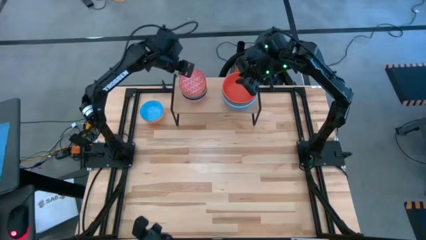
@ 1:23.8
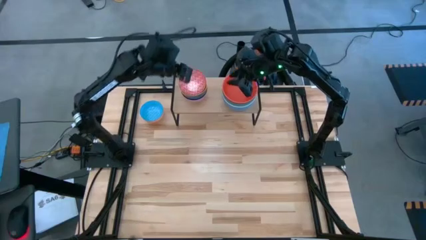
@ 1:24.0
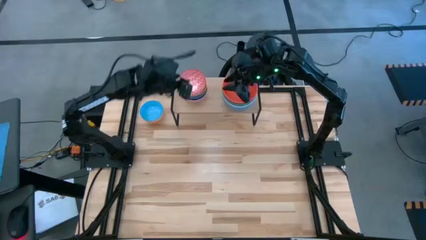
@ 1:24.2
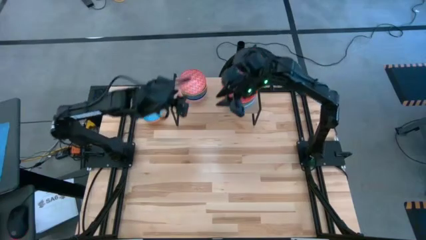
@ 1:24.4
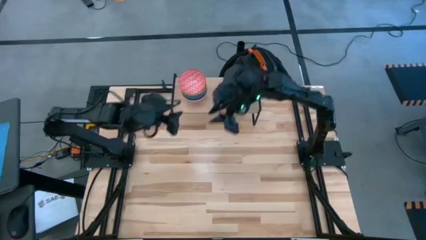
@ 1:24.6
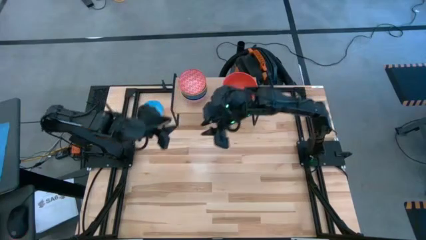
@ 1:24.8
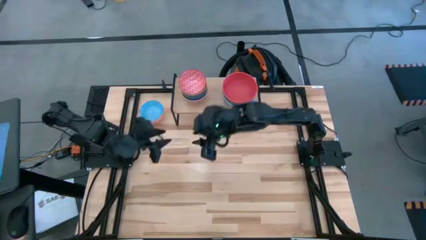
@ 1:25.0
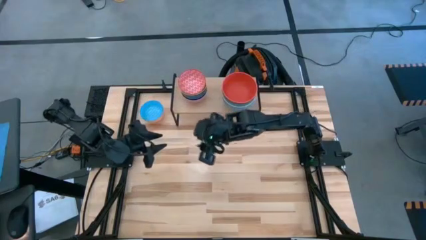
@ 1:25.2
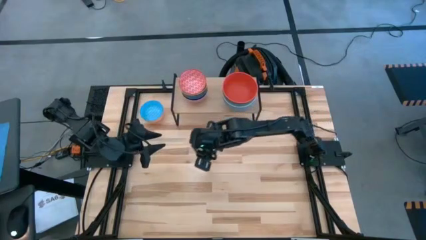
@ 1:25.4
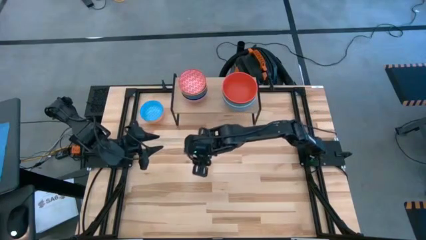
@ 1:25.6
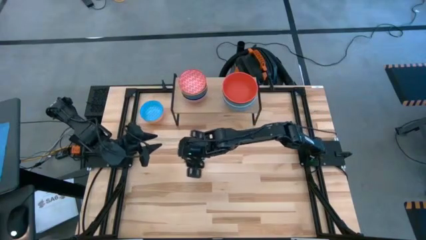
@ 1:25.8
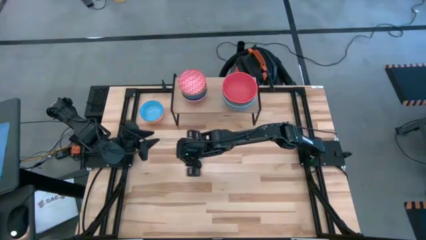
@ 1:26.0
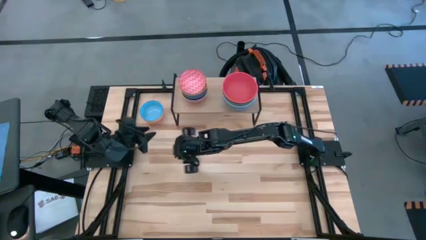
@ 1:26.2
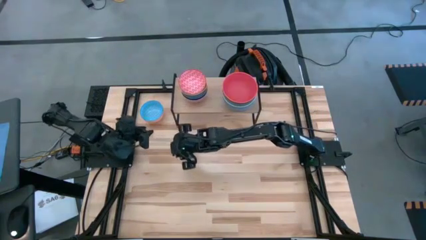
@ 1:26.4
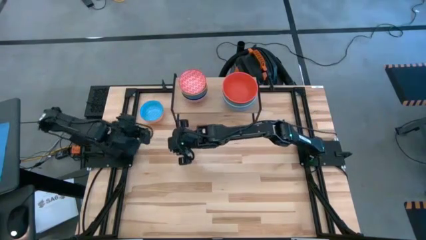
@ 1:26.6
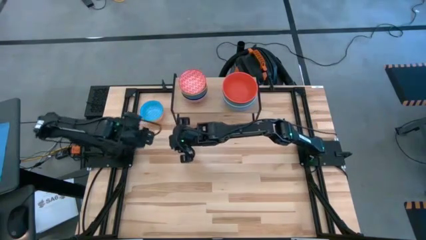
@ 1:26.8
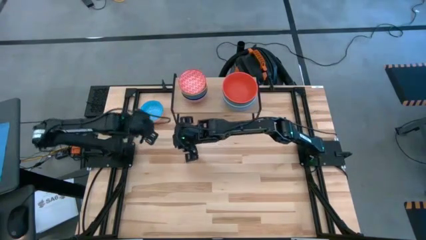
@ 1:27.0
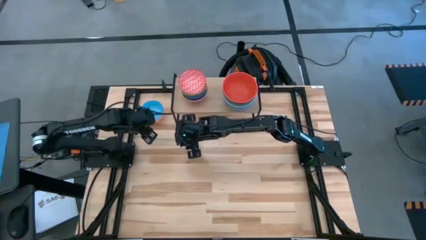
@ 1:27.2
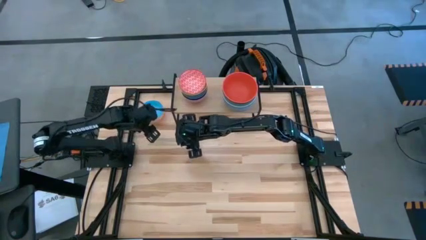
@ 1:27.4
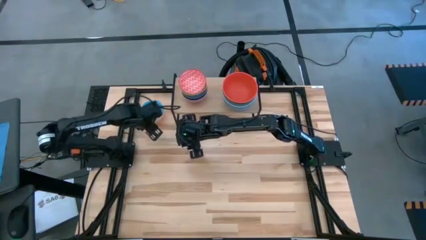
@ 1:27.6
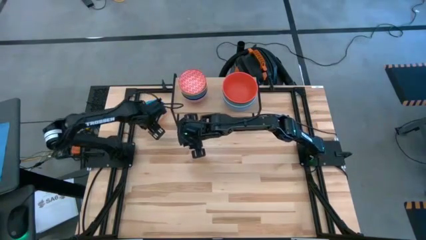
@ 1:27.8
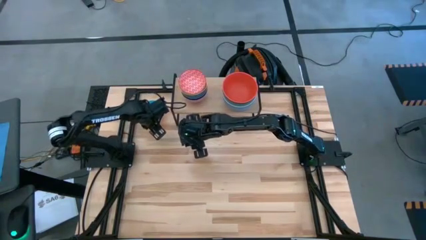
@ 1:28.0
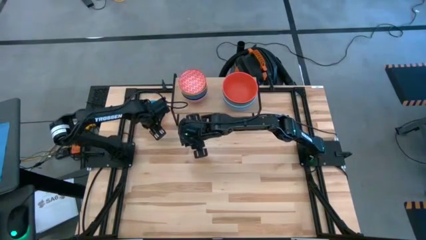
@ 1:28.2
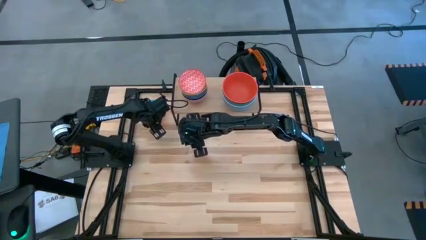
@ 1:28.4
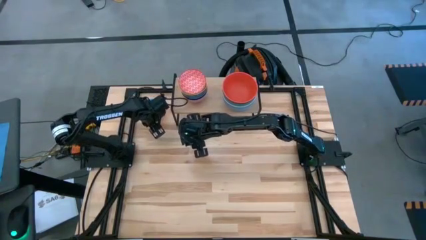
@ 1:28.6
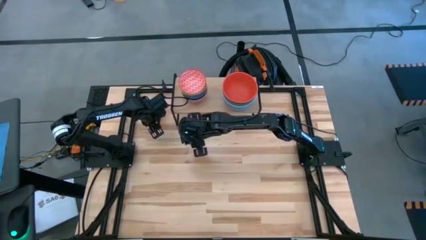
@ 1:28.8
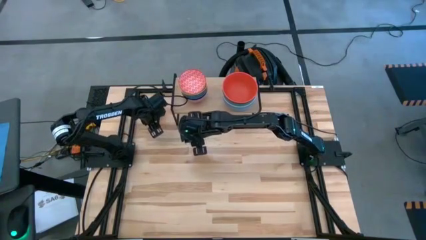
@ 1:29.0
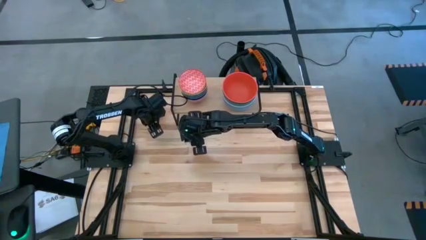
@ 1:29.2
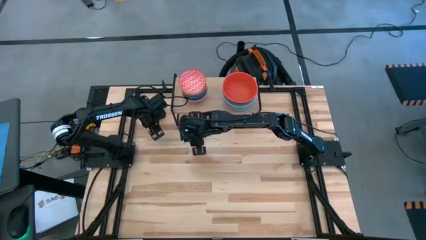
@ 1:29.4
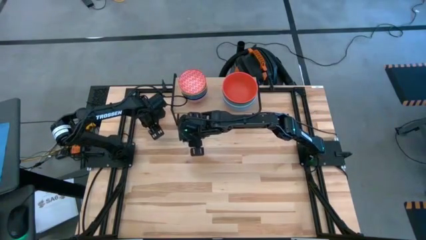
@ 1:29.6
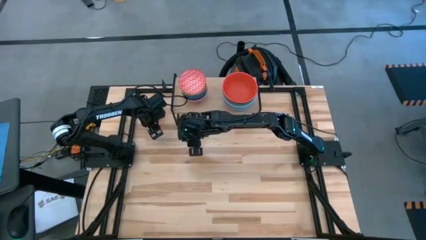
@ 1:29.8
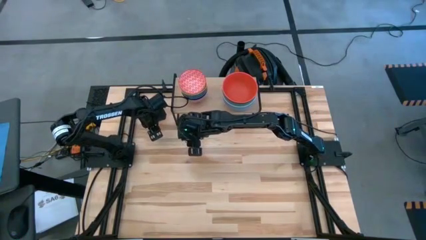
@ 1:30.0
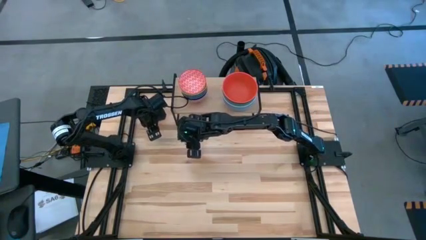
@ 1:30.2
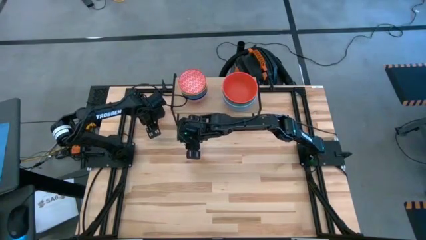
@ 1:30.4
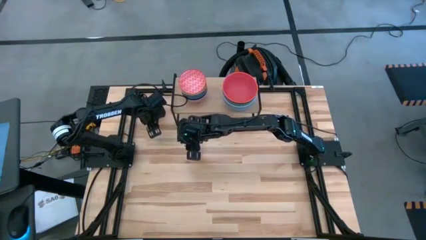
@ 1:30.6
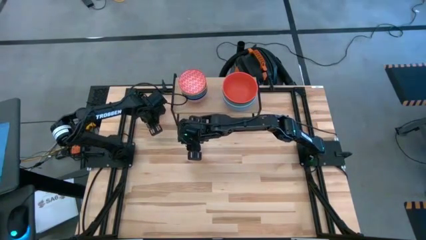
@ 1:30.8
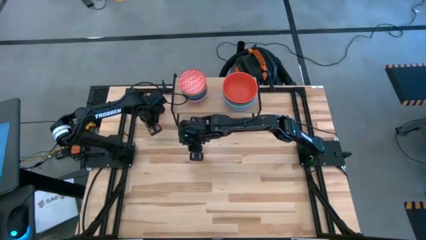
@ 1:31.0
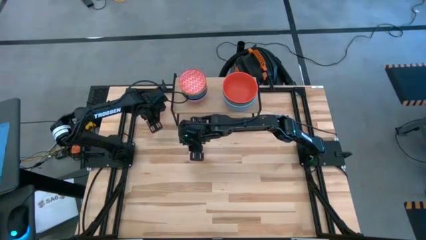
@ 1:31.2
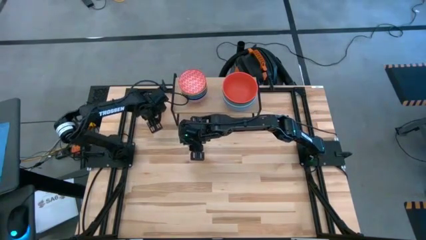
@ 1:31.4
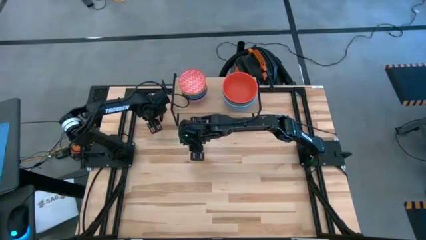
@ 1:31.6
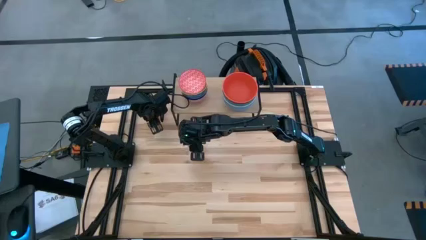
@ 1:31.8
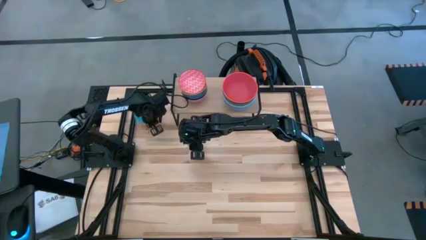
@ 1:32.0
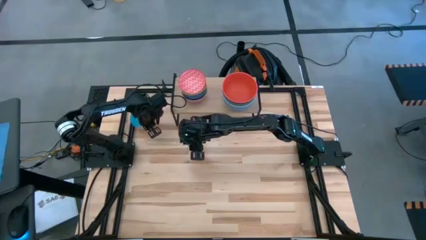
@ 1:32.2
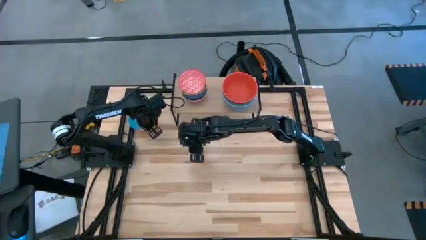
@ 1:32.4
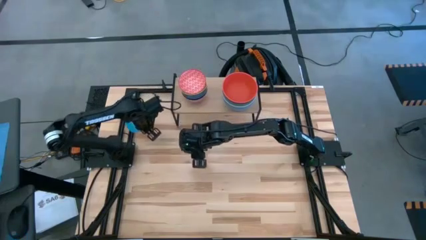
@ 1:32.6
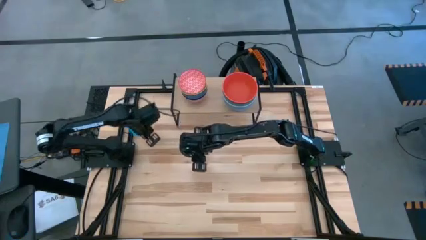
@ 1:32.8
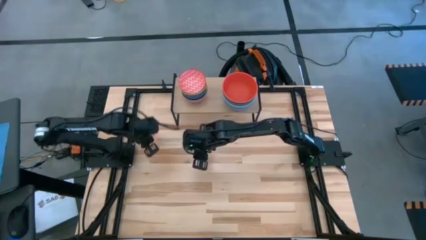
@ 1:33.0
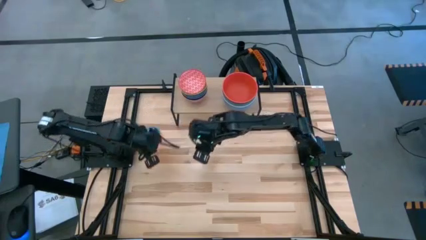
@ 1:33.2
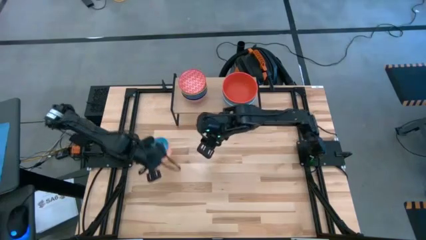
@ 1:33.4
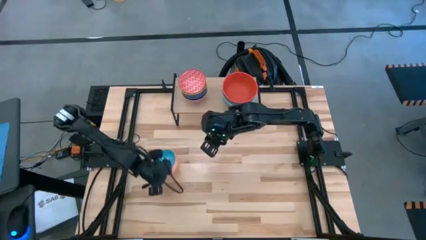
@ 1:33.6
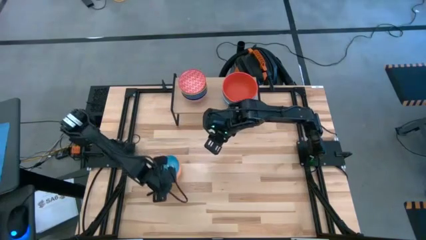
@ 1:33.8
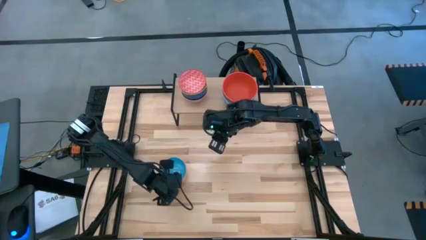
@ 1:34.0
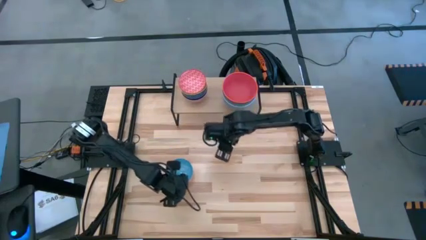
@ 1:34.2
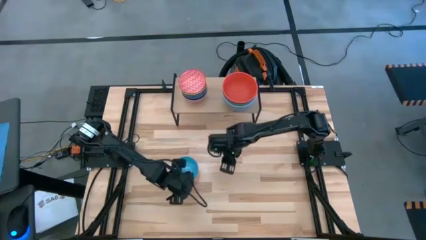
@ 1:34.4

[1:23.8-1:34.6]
Task: Place and stack bowls onto a shelf
Stack the patterned light blue bowl on top of the patterned red bowl on the shelf
